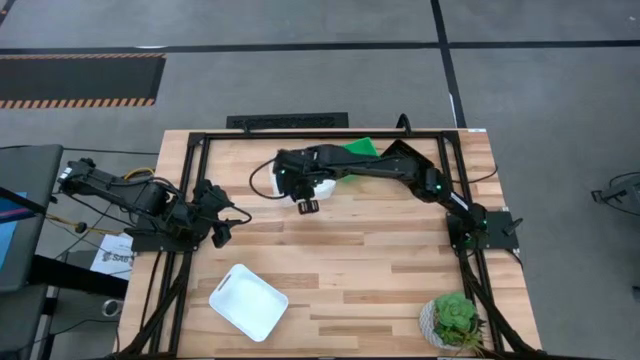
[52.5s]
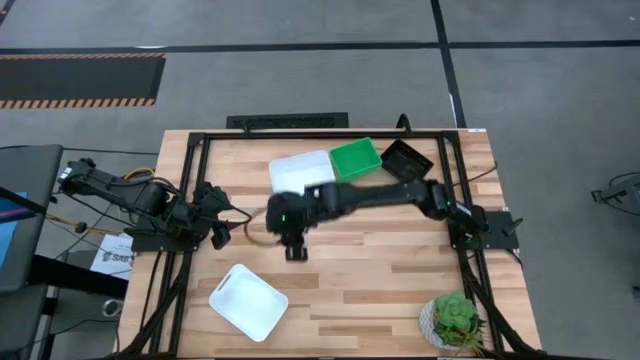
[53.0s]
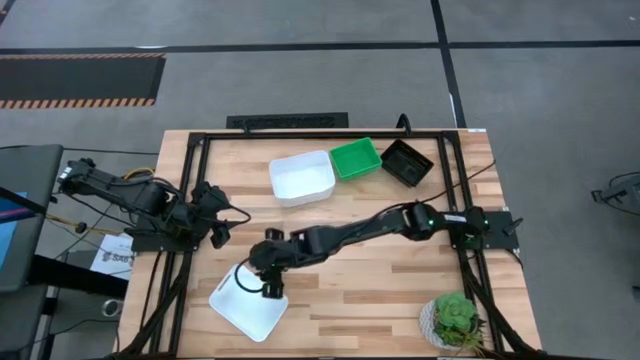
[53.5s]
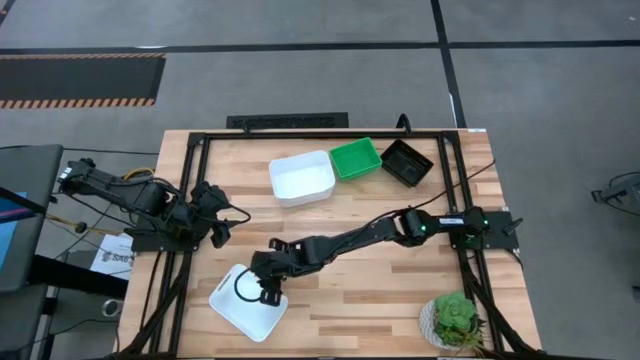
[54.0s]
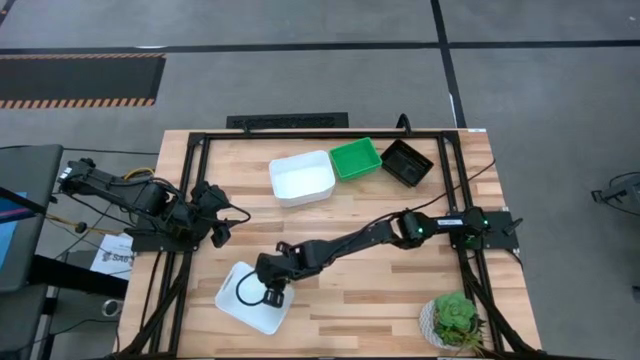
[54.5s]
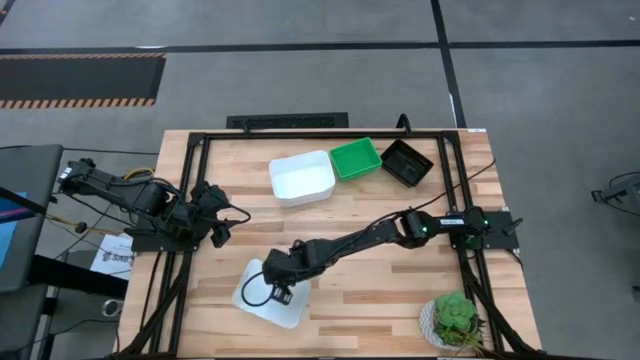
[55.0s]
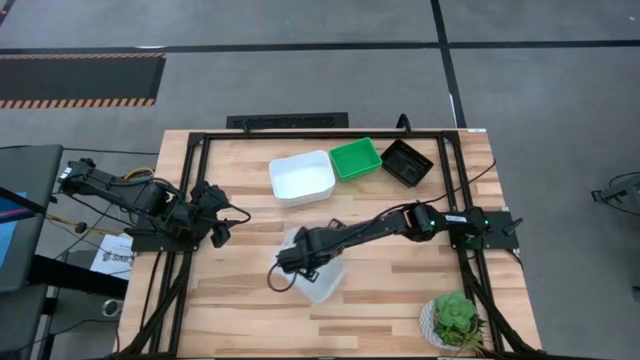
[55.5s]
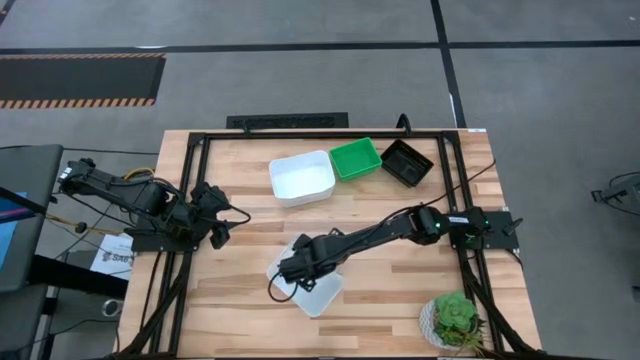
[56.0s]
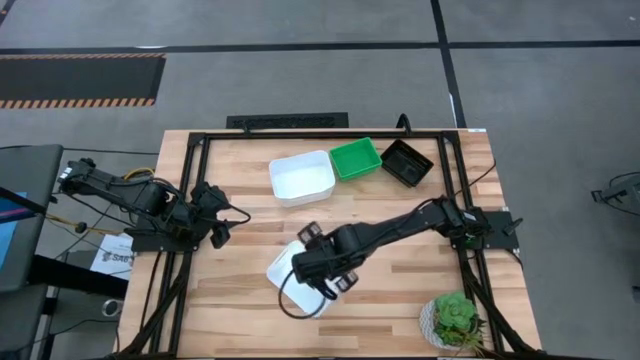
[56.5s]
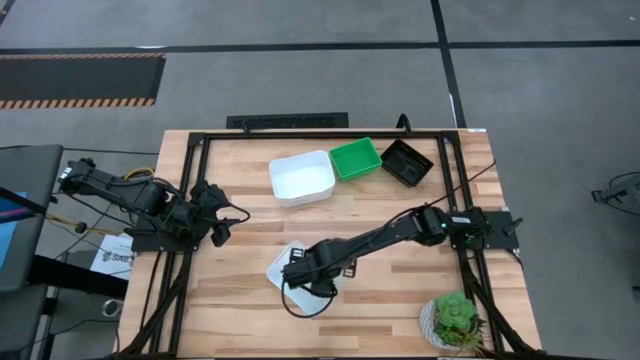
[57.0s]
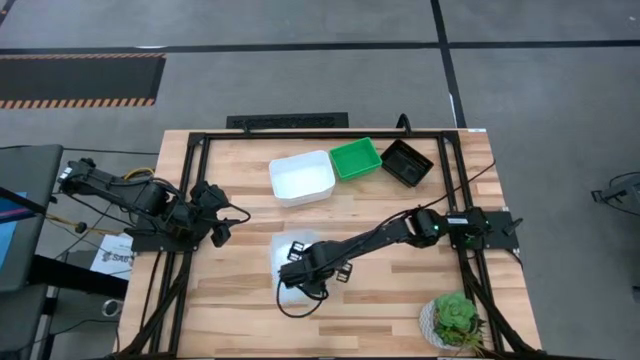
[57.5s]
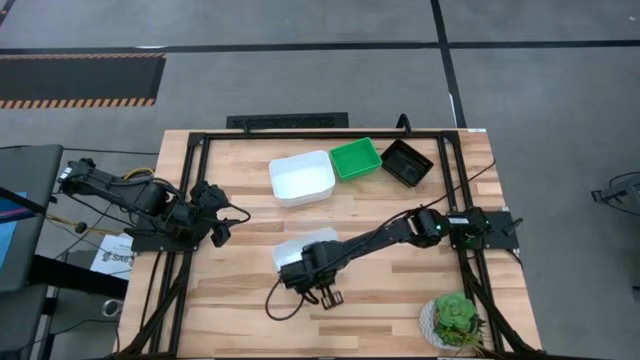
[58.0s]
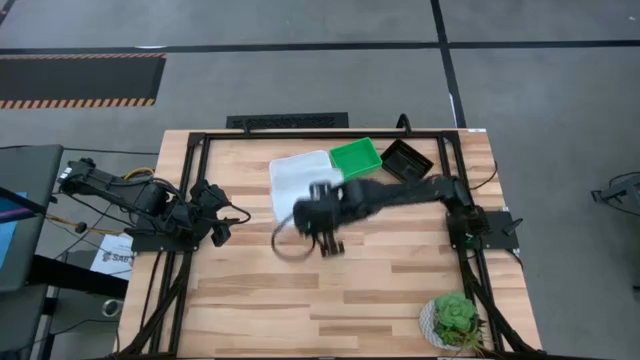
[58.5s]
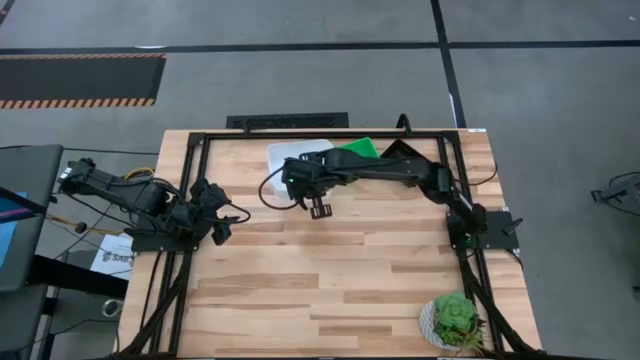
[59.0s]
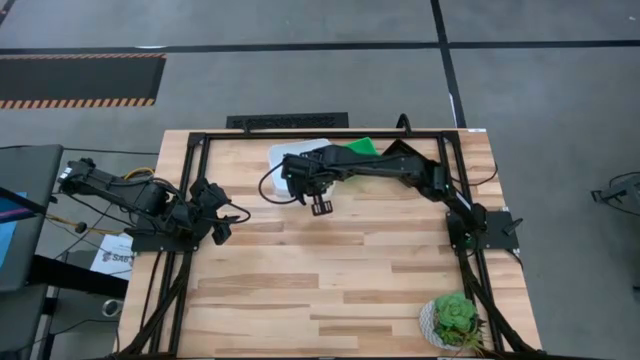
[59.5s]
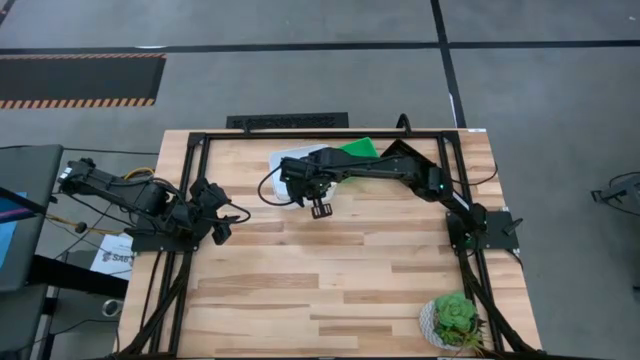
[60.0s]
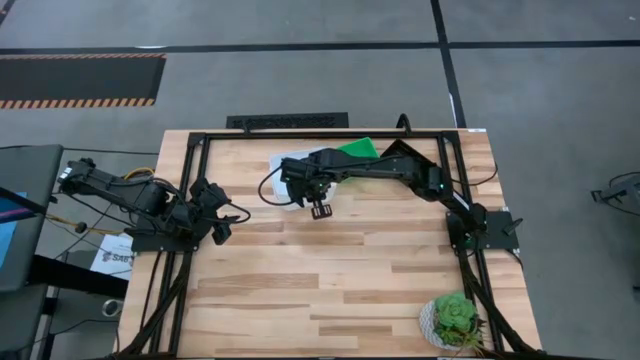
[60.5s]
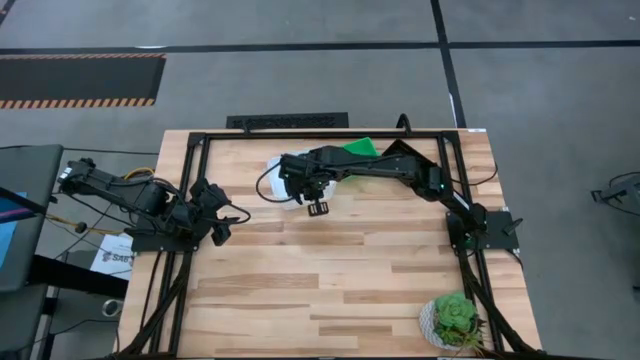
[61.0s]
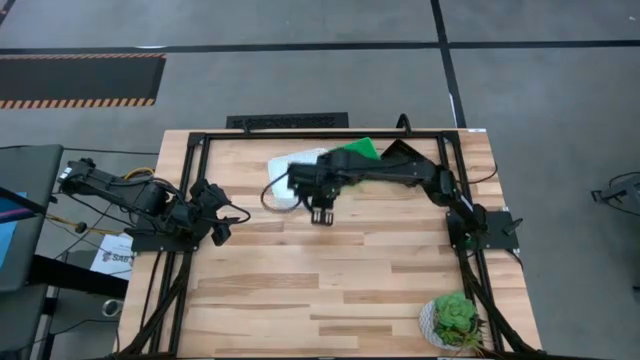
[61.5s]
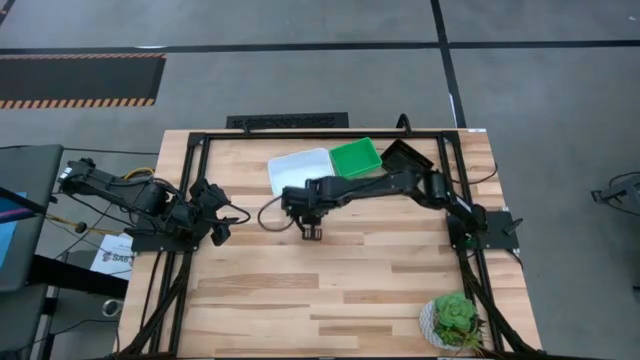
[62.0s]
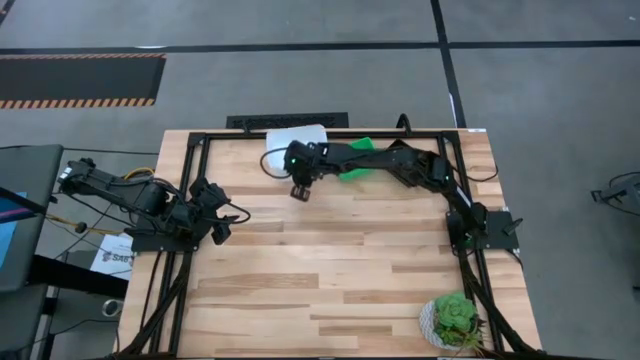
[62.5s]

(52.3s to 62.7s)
Stack the white bin on top of the white bins

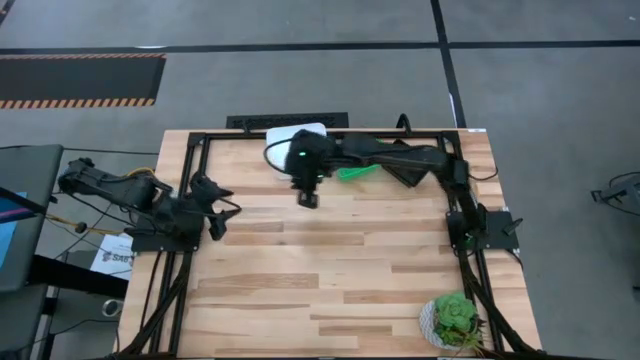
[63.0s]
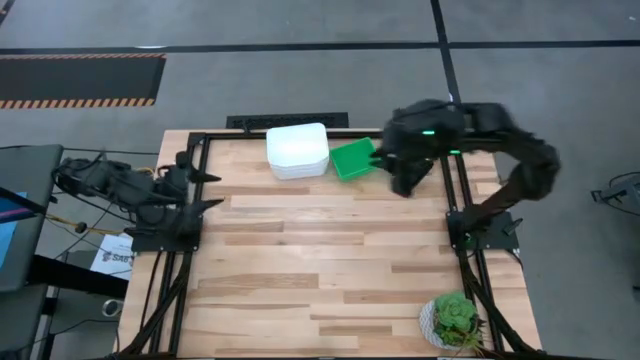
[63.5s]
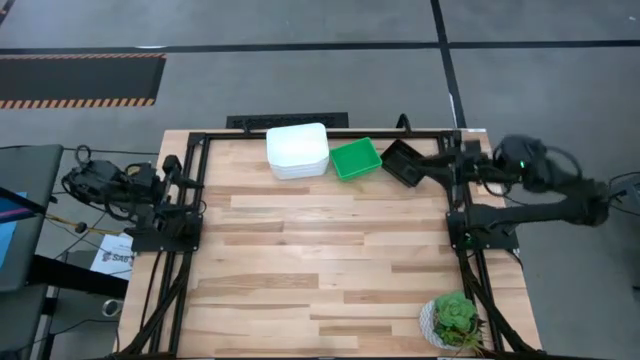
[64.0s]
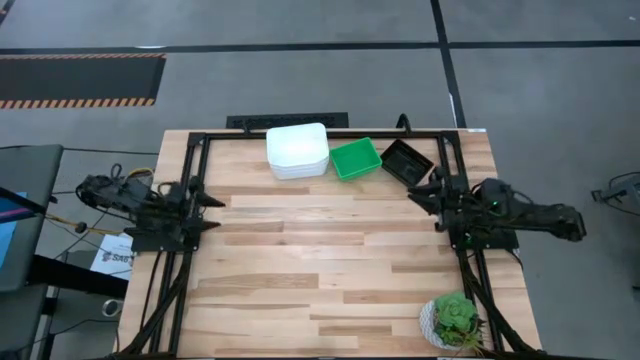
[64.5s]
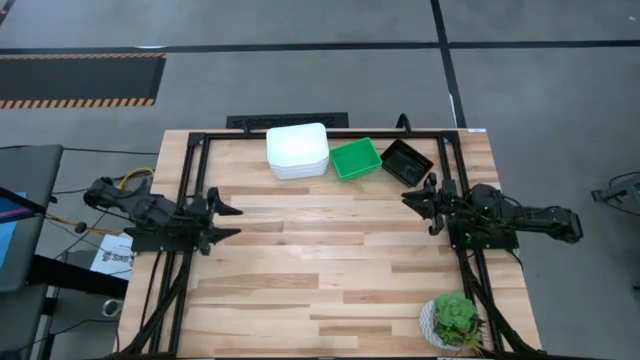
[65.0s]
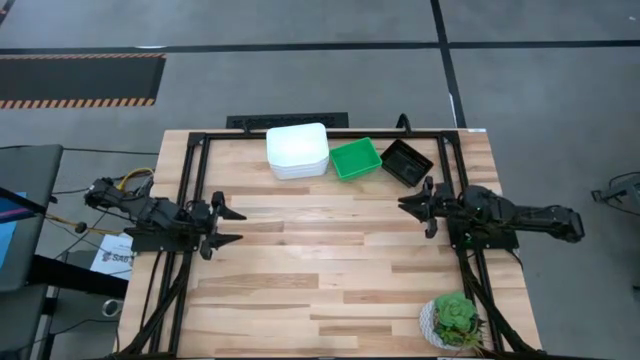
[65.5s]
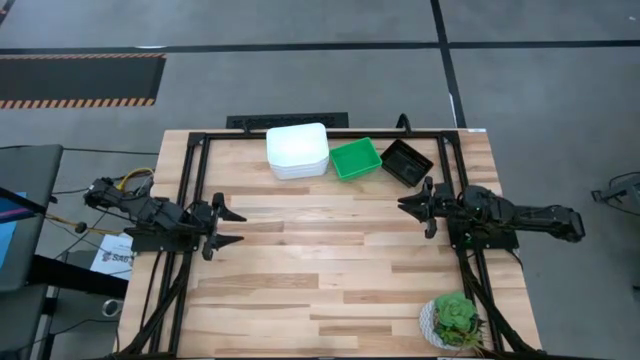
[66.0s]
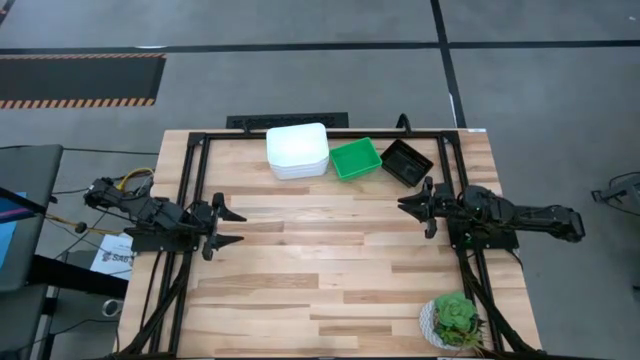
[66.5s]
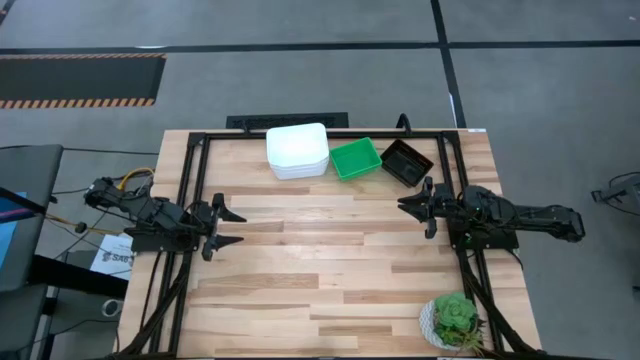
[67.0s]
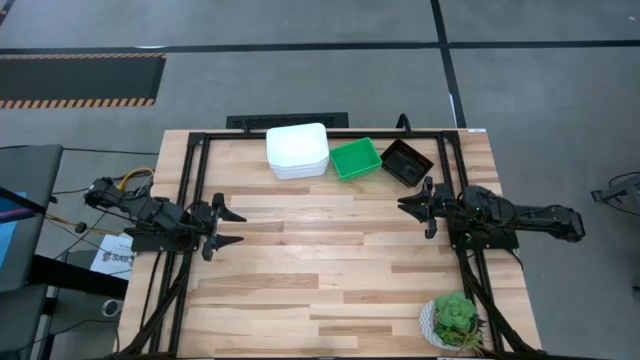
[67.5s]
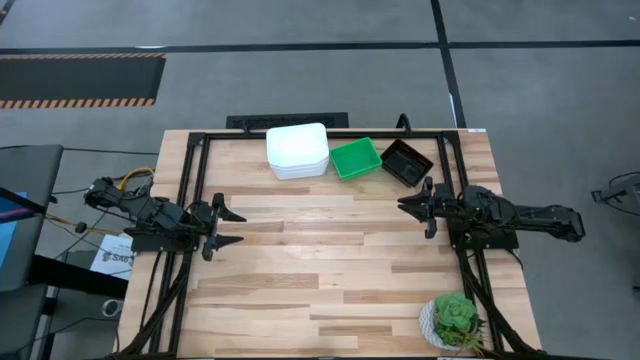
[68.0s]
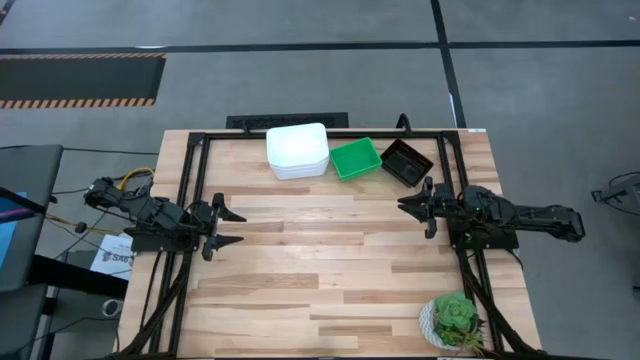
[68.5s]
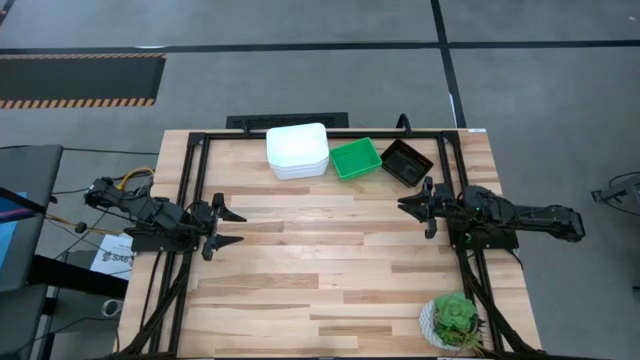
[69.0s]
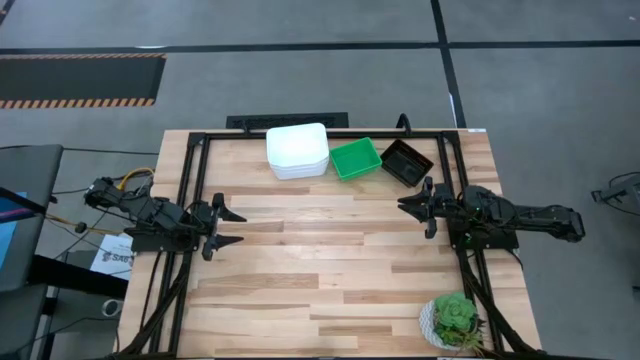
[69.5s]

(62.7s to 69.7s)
Return to Home Position
